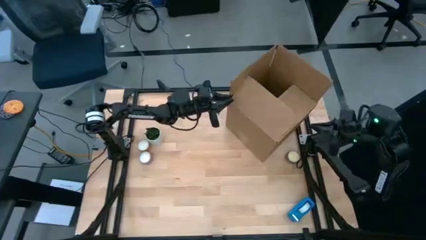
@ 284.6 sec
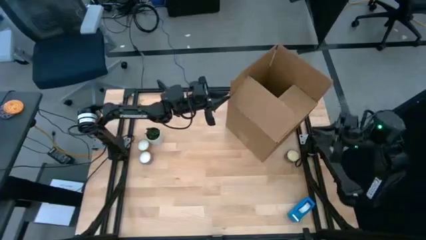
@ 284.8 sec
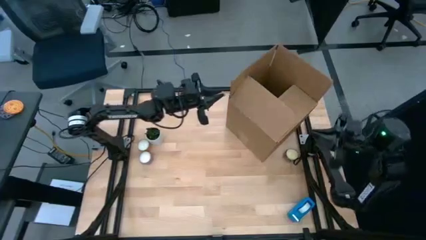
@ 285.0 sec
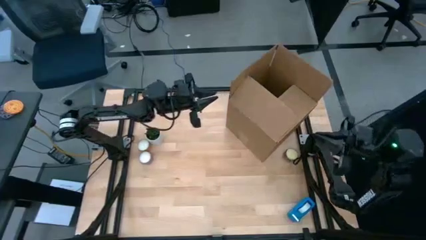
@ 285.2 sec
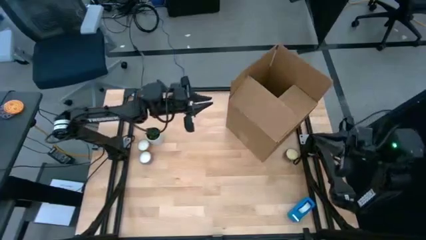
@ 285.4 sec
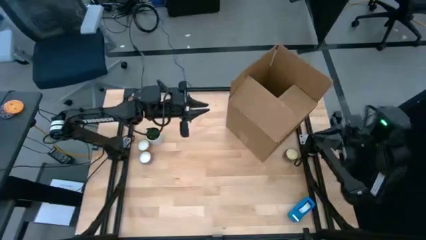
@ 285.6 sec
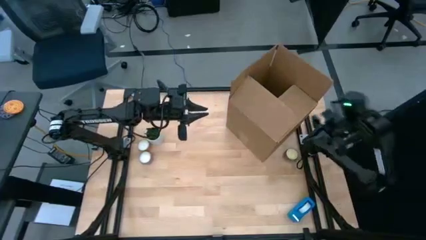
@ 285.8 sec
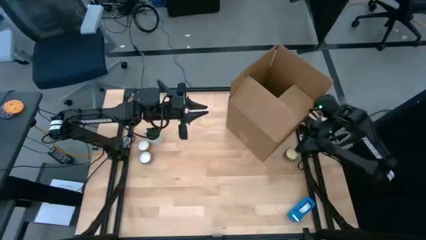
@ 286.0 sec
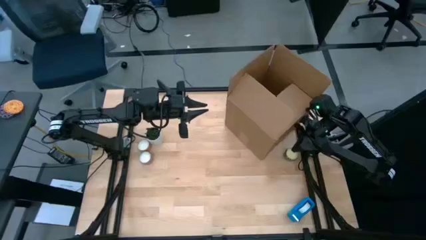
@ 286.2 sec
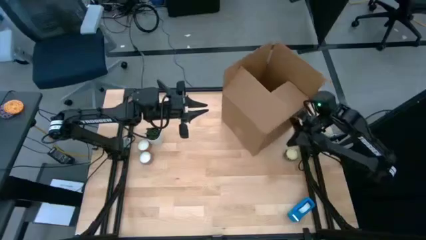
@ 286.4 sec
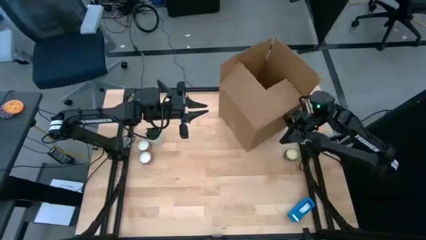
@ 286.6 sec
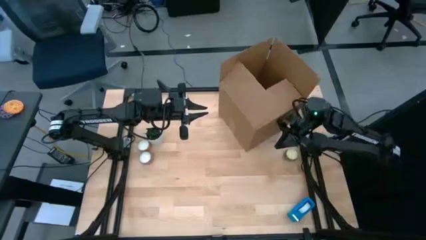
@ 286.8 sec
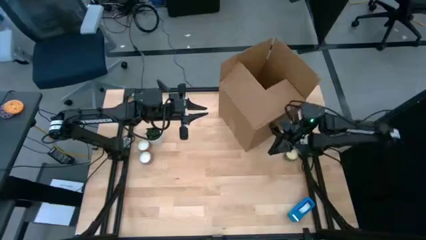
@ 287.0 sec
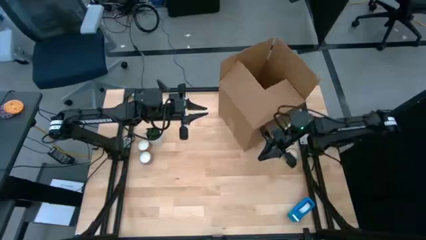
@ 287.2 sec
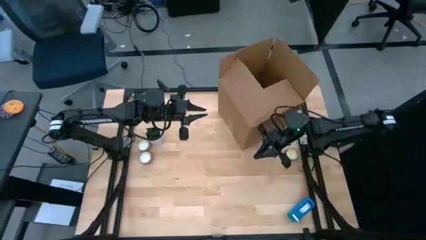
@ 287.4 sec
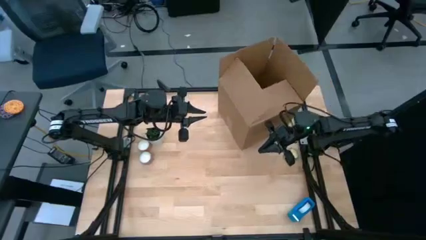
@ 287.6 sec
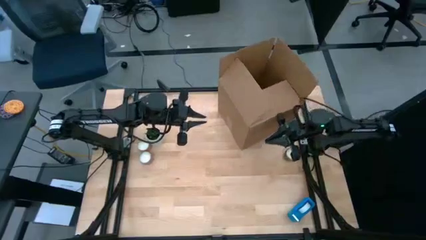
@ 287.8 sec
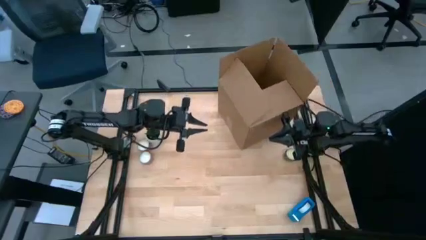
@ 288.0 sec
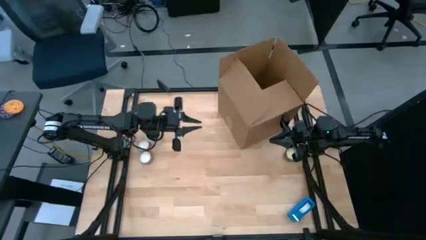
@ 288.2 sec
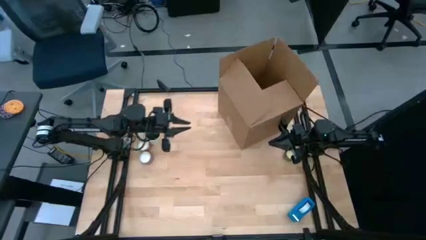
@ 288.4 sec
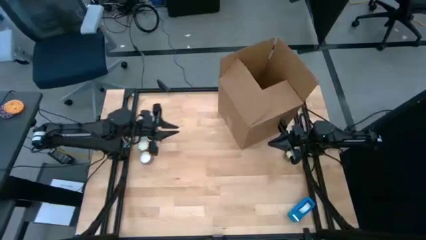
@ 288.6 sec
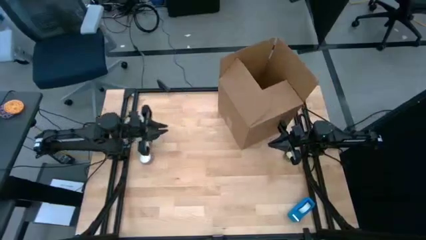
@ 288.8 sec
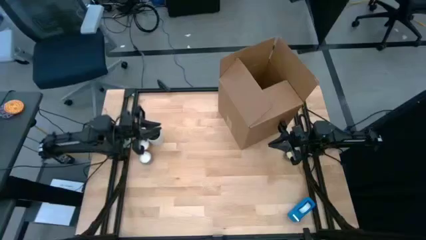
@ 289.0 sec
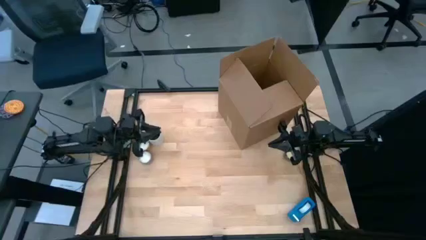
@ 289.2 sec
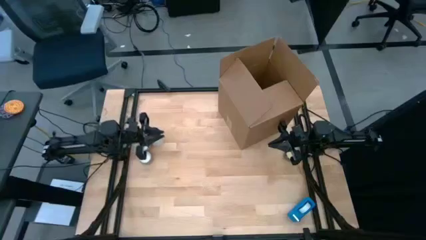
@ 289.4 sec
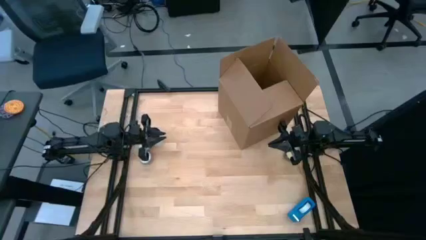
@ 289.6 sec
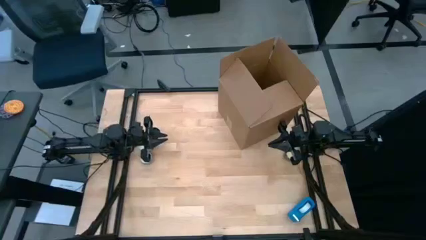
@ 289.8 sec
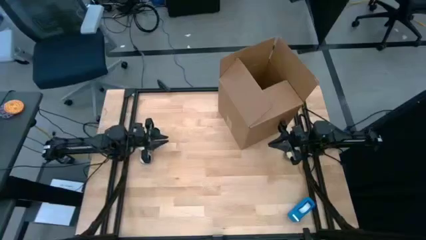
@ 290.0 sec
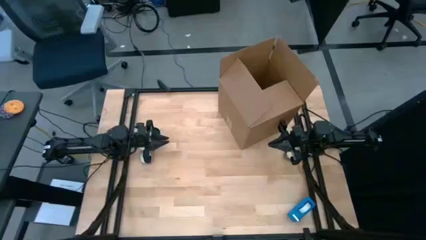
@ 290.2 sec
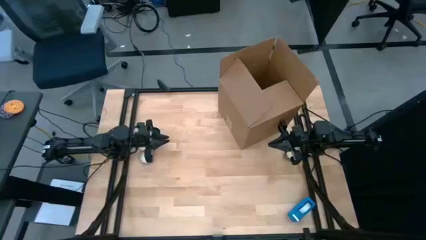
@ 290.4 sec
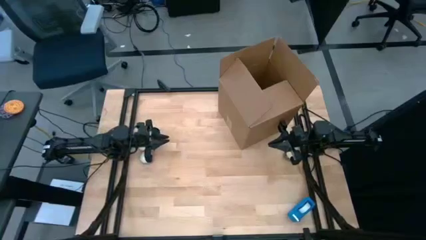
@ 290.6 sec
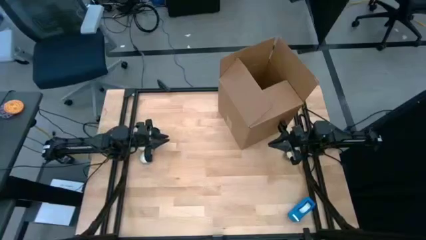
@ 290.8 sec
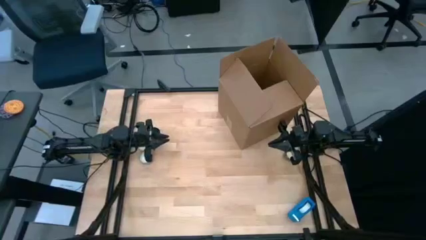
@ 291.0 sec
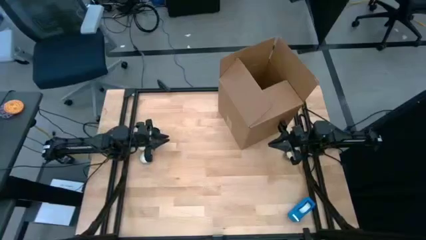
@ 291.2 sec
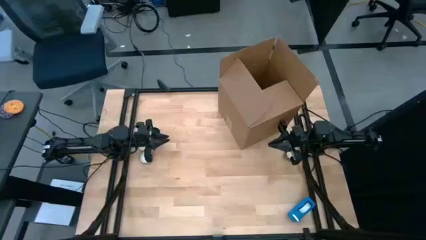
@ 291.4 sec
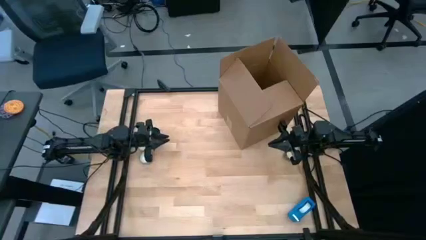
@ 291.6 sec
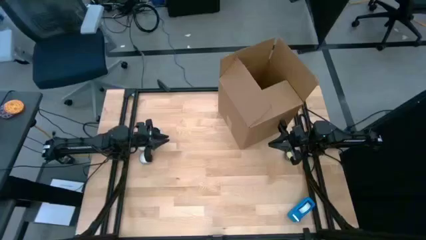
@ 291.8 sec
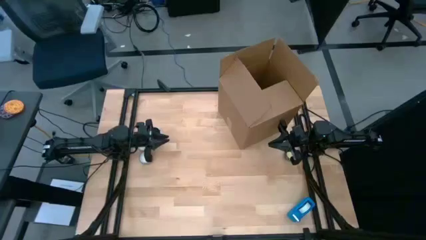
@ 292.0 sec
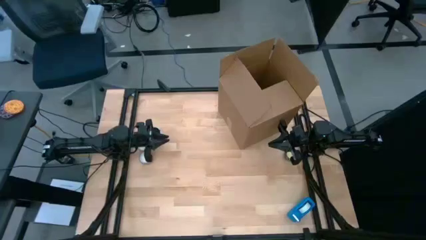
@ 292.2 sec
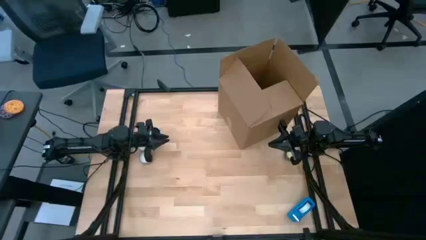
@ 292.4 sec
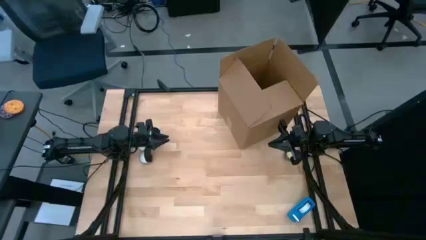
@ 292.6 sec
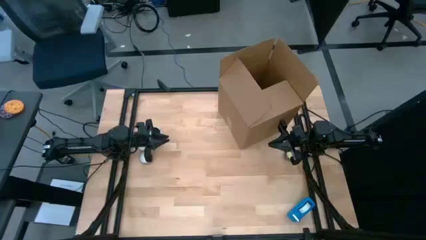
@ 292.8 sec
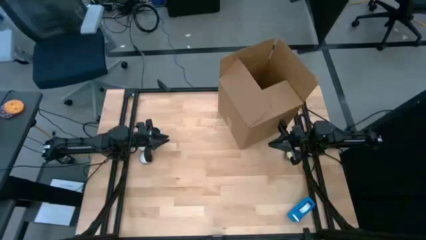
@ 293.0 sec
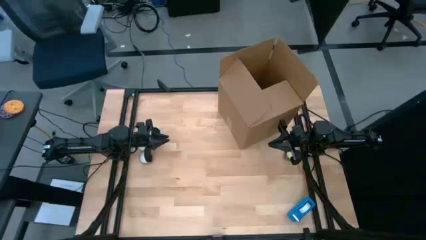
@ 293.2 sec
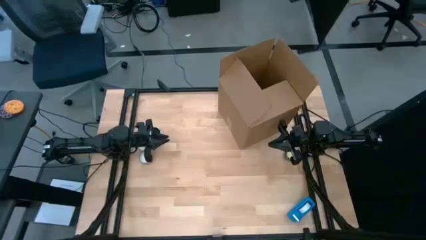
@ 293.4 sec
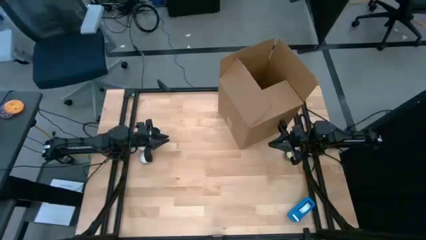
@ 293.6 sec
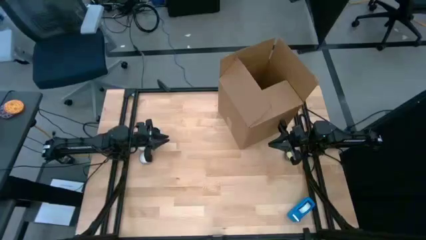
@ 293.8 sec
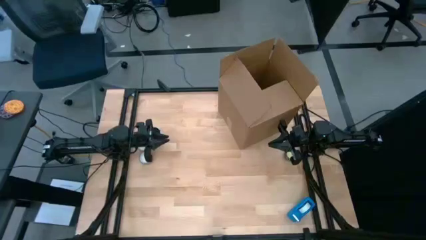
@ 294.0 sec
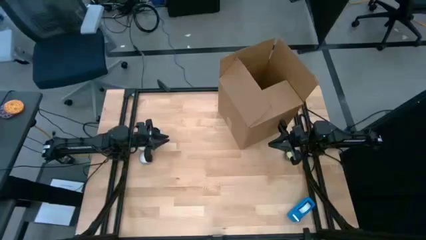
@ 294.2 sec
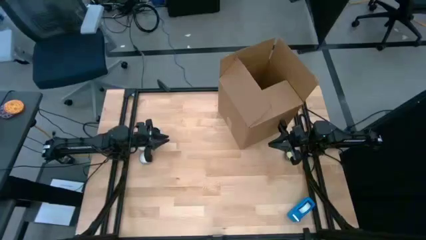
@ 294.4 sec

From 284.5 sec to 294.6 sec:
Task: wrap mug
Return to Home Position

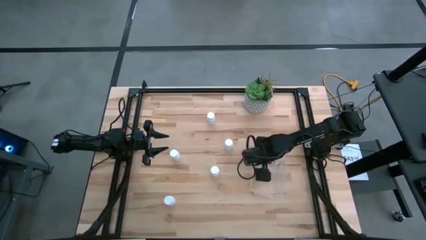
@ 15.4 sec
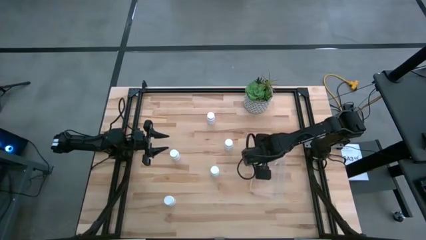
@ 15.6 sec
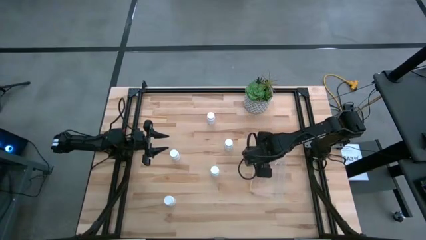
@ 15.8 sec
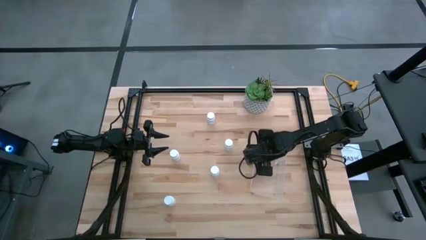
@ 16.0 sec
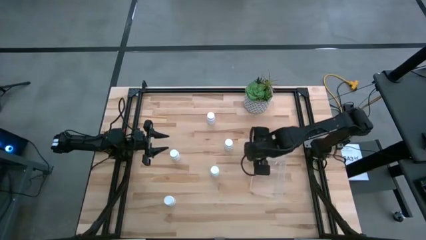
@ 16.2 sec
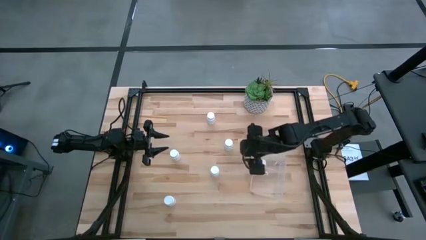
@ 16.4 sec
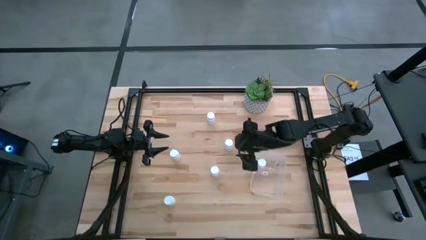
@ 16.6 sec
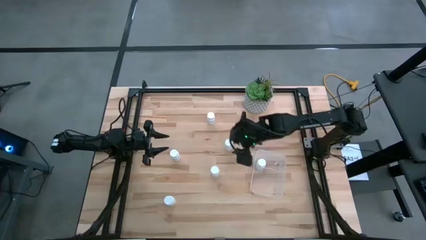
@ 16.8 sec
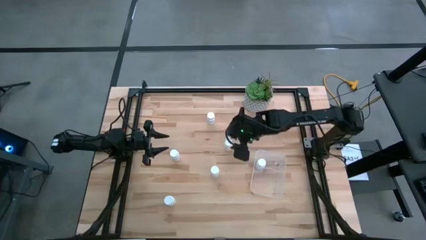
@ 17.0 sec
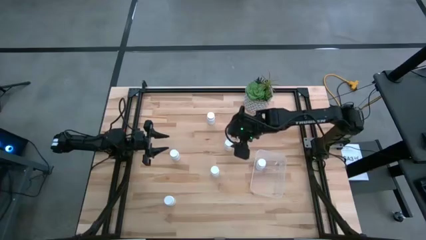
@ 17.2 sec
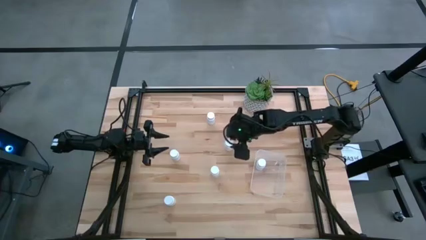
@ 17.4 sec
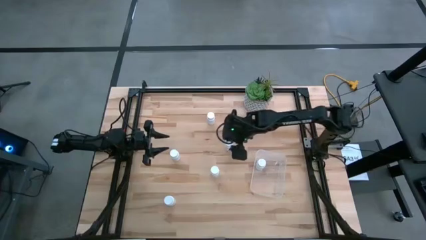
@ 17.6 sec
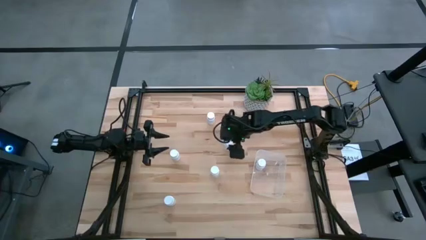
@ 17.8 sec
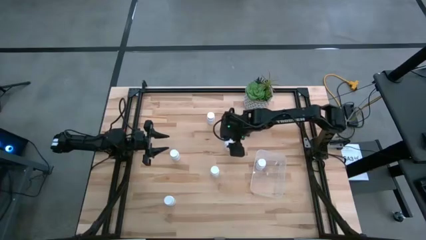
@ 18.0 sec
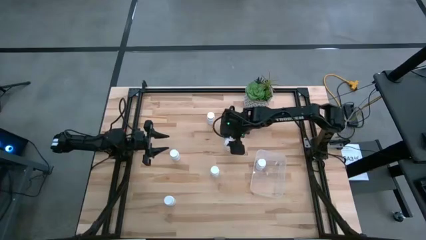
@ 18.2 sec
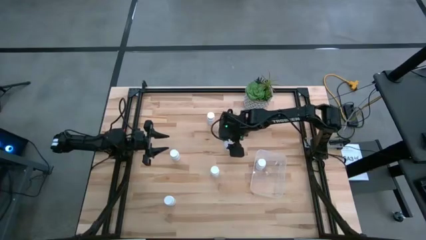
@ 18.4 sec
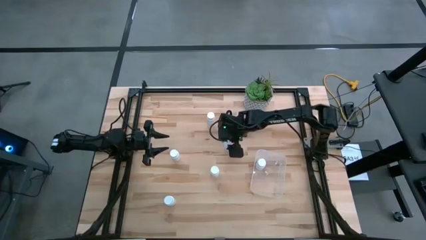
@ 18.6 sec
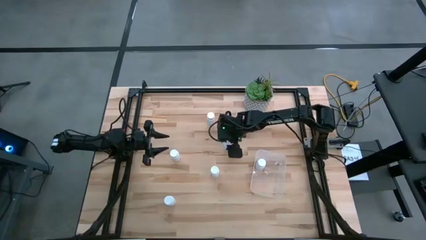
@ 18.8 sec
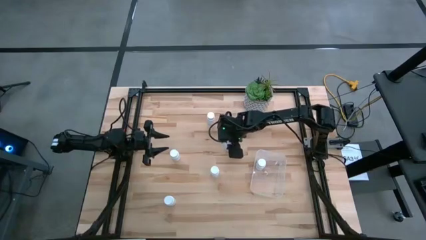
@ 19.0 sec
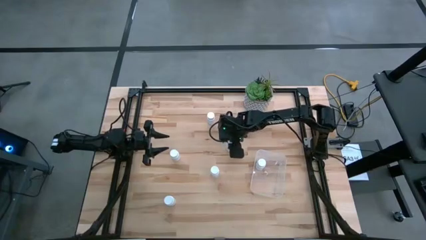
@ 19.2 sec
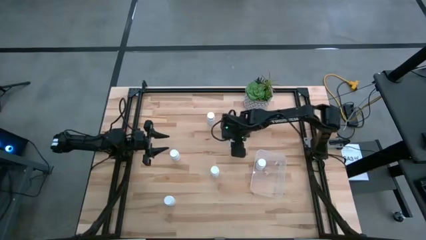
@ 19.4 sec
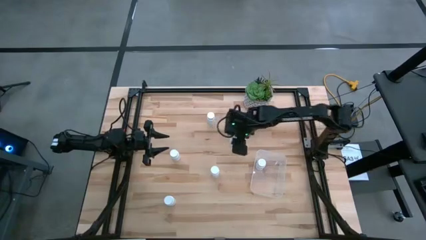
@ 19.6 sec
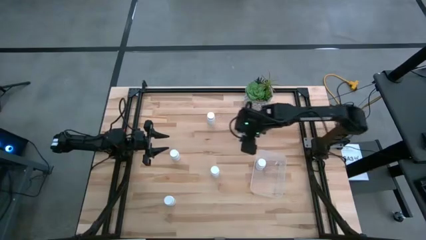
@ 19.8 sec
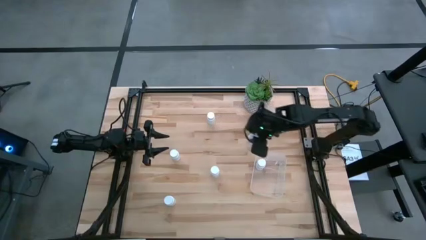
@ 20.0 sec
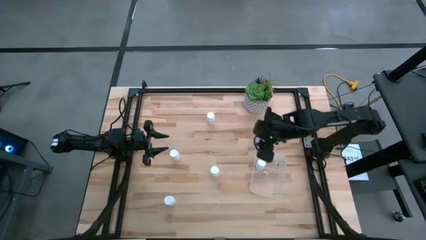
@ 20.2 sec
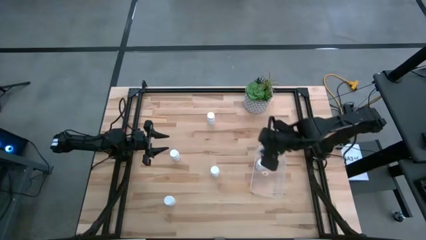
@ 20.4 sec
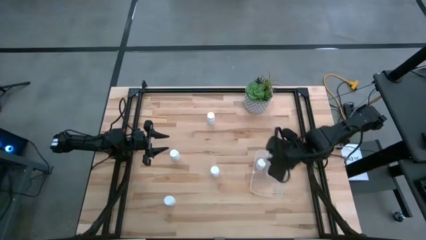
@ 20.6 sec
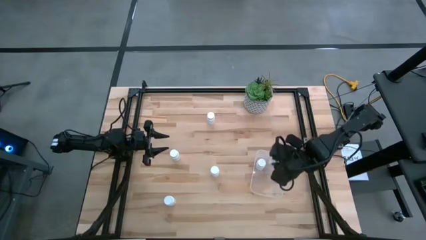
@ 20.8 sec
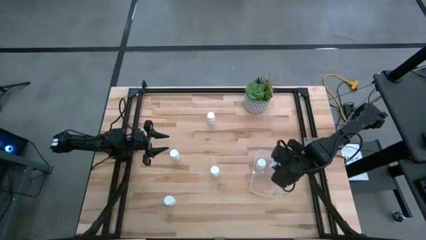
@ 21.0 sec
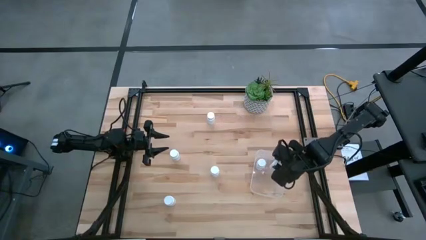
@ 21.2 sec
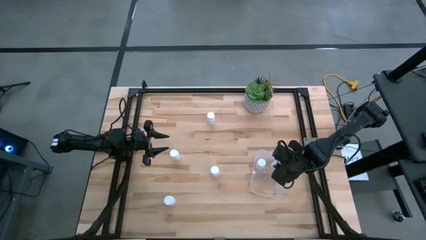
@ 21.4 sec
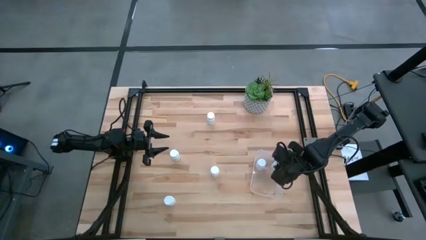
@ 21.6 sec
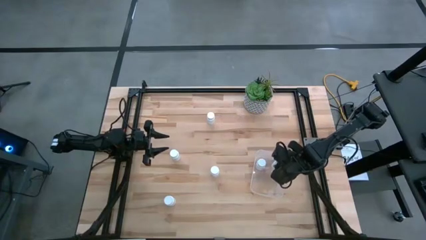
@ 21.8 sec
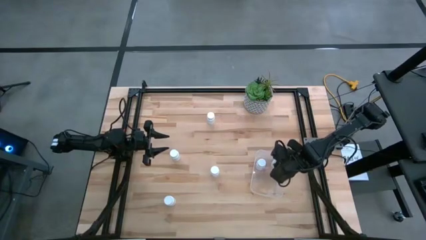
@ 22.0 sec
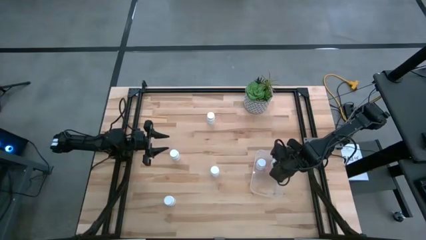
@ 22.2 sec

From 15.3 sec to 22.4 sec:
Task: Pick and place pill bottles into a basket
Put the white medicine bottle into the transparent bin
